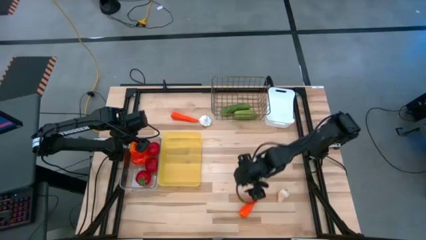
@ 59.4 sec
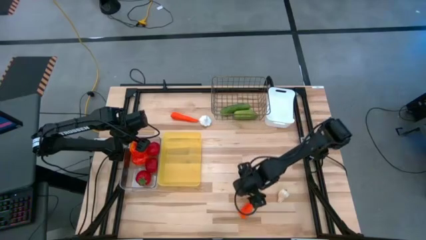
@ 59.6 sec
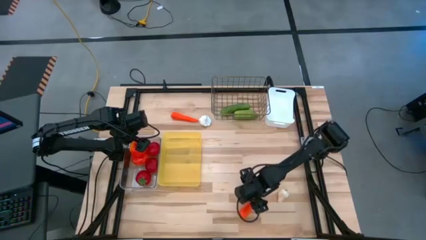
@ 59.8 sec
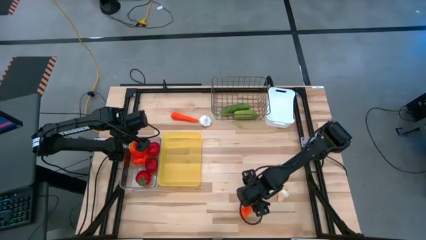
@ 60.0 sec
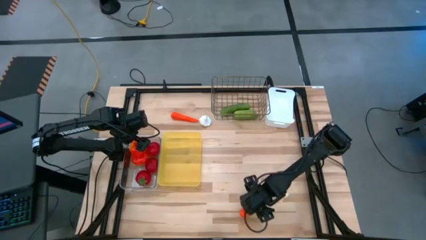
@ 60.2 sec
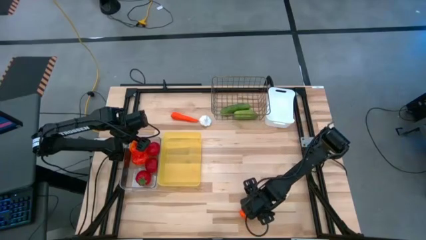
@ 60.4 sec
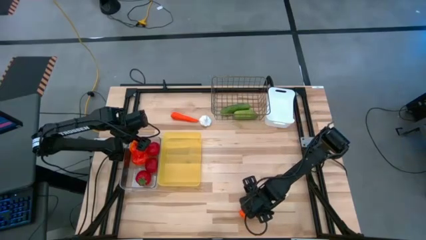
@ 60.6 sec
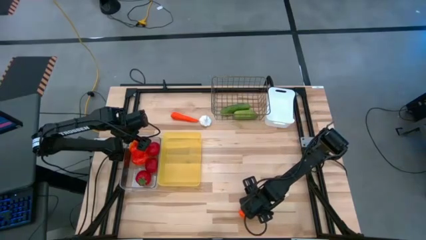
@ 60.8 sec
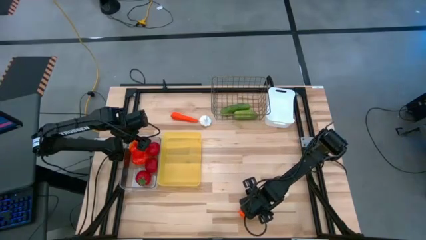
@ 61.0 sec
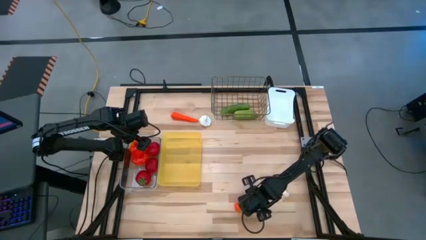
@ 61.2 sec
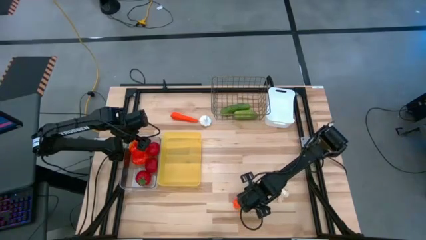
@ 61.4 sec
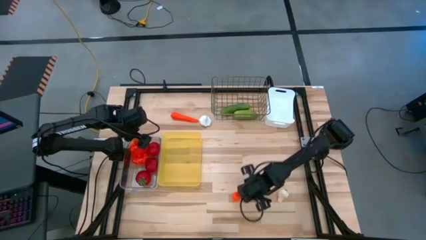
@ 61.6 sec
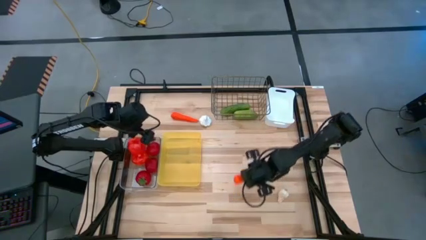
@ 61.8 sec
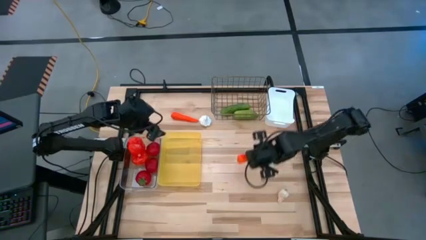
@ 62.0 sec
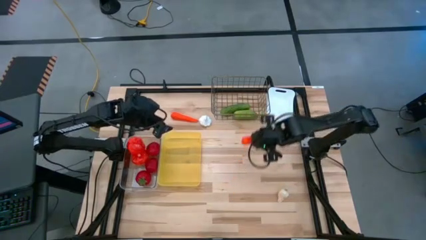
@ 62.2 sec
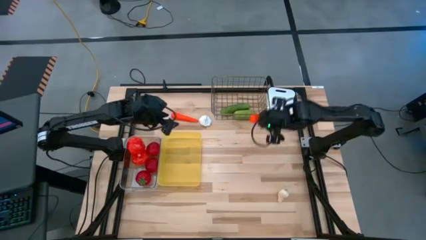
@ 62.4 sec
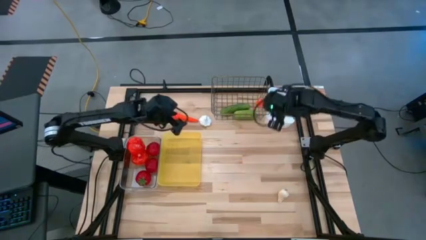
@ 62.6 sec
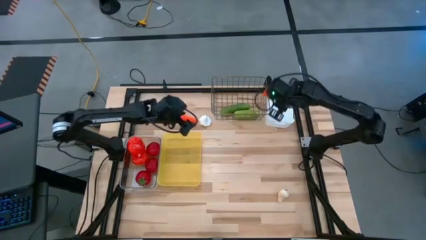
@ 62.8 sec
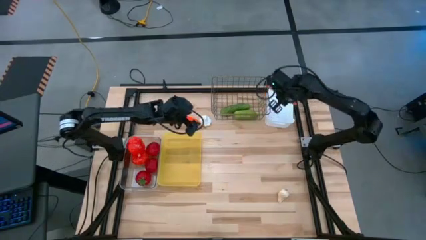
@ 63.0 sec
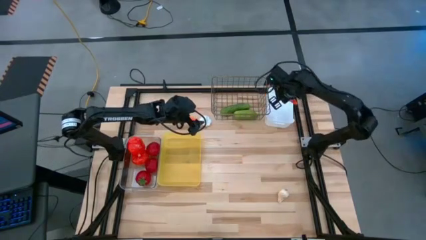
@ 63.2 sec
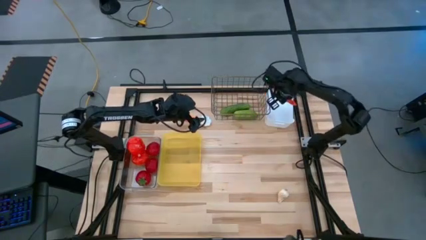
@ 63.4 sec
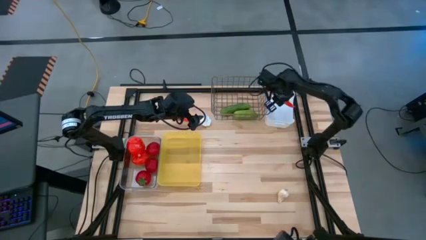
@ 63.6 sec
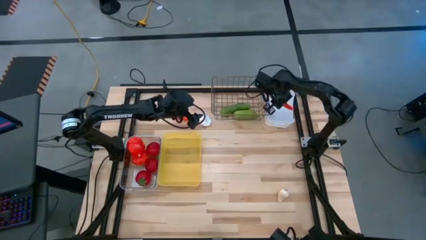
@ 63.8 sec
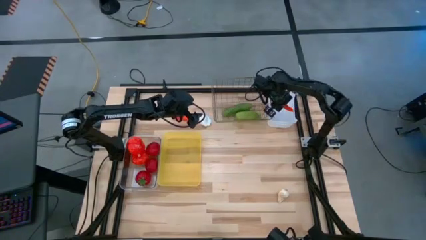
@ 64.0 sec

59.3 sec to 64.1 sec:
Task: Sort produce into baskets
Put the bottom carrot into the white bin

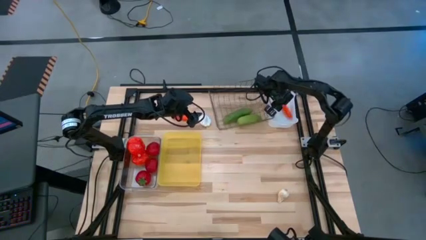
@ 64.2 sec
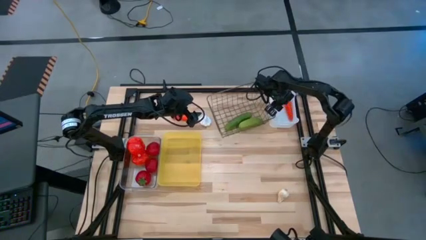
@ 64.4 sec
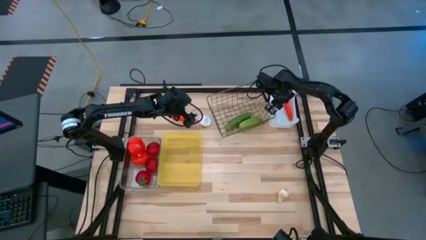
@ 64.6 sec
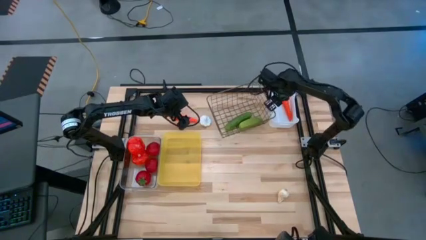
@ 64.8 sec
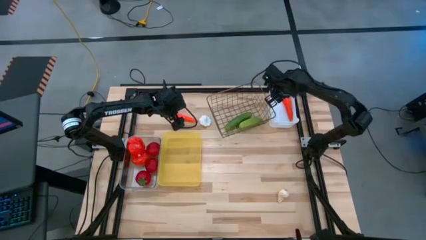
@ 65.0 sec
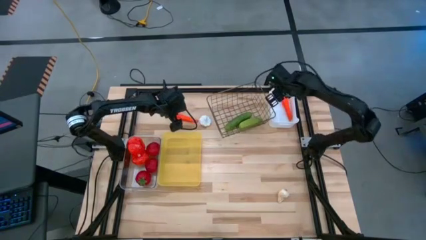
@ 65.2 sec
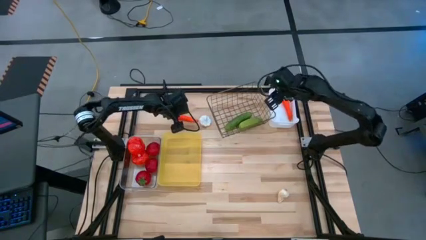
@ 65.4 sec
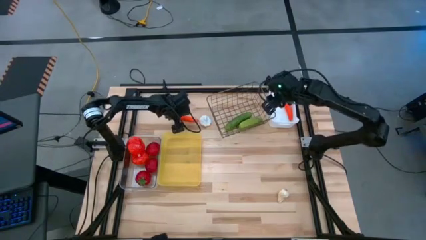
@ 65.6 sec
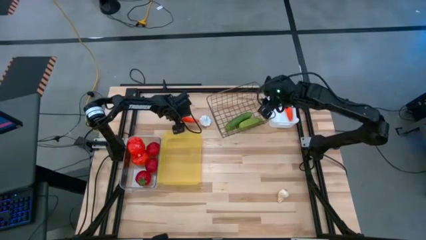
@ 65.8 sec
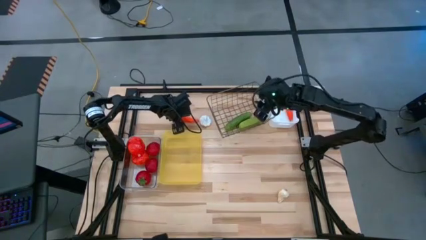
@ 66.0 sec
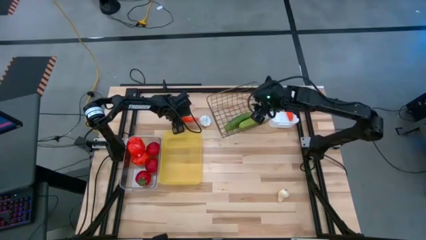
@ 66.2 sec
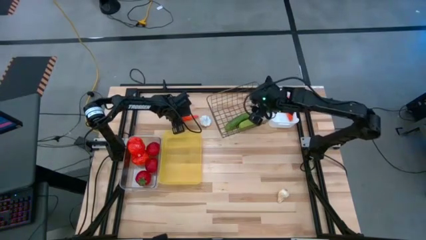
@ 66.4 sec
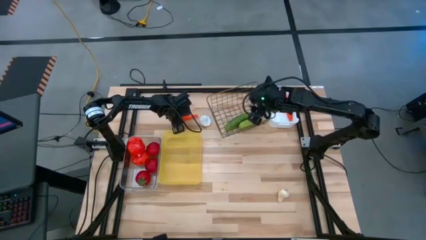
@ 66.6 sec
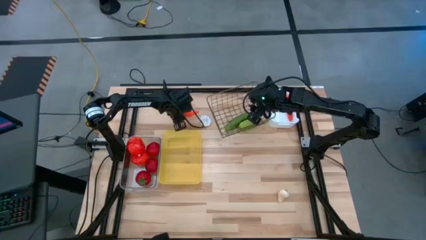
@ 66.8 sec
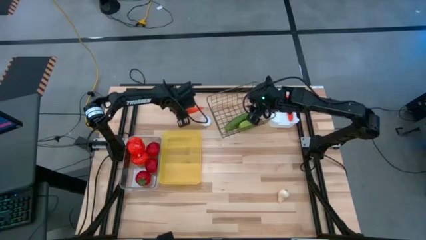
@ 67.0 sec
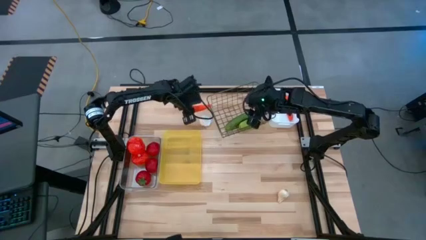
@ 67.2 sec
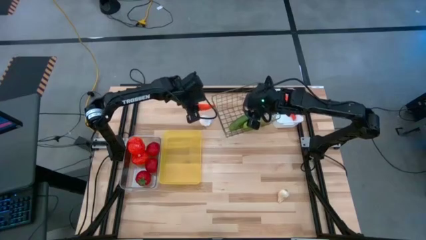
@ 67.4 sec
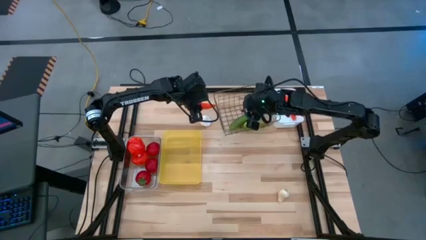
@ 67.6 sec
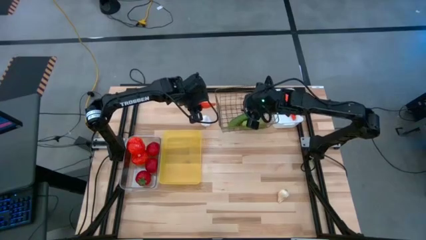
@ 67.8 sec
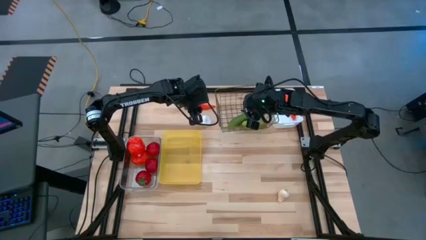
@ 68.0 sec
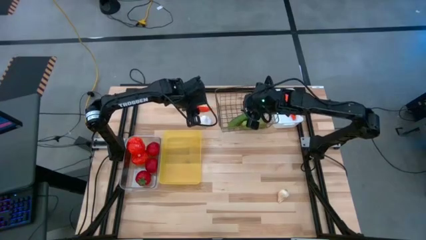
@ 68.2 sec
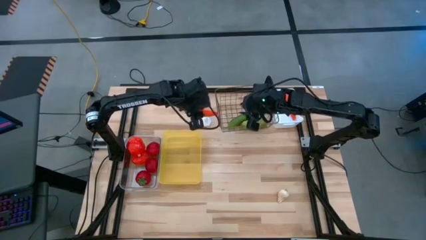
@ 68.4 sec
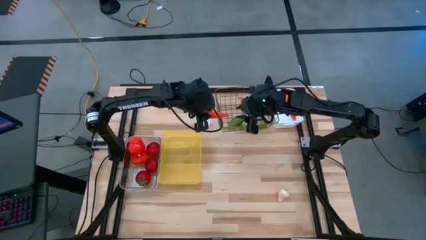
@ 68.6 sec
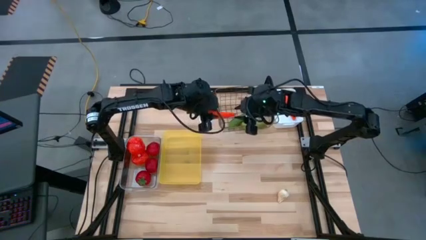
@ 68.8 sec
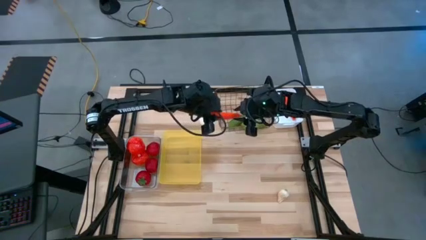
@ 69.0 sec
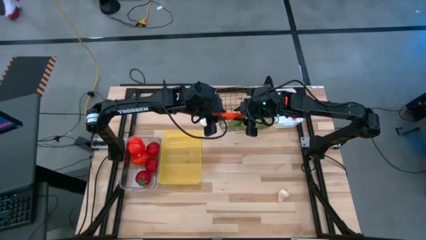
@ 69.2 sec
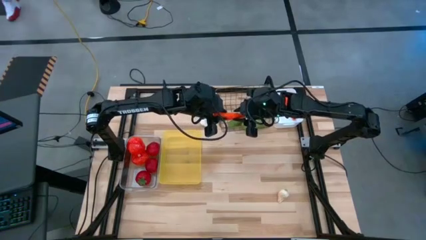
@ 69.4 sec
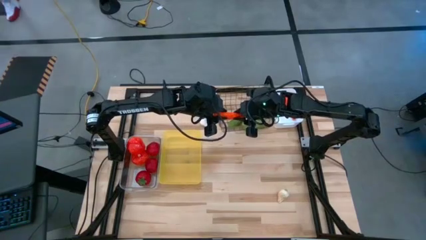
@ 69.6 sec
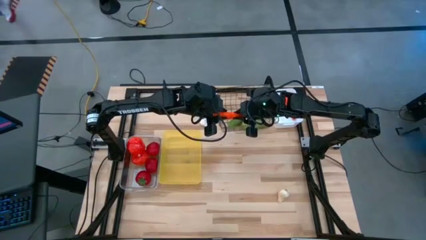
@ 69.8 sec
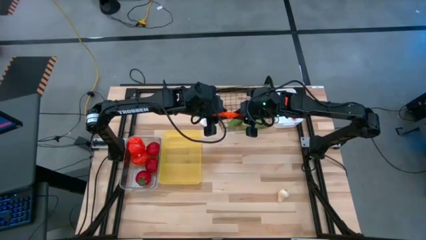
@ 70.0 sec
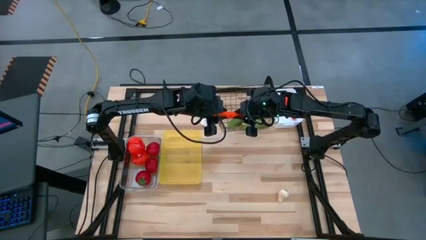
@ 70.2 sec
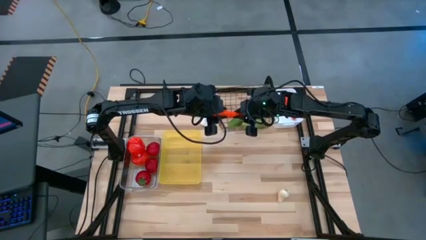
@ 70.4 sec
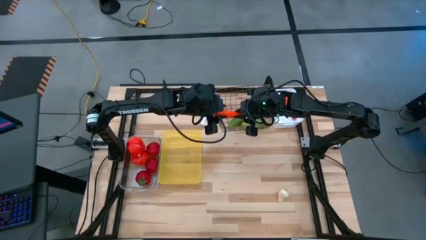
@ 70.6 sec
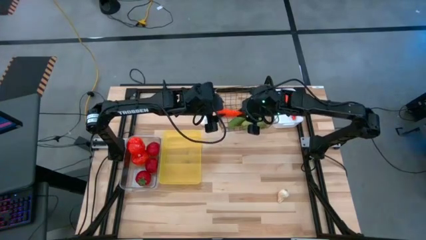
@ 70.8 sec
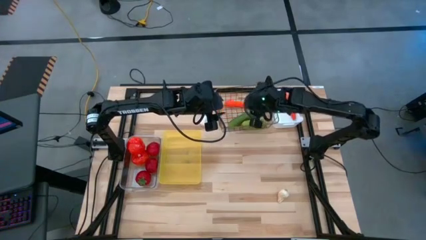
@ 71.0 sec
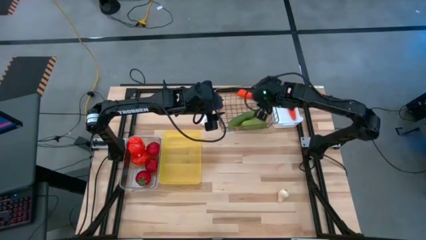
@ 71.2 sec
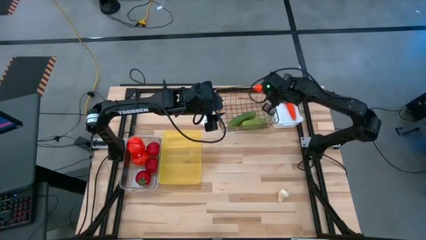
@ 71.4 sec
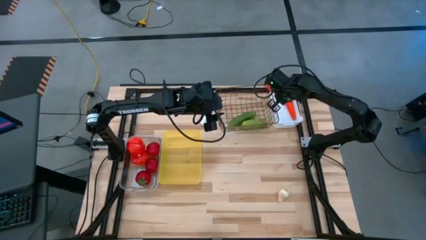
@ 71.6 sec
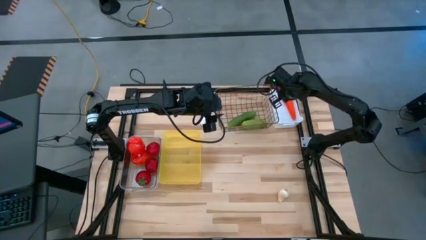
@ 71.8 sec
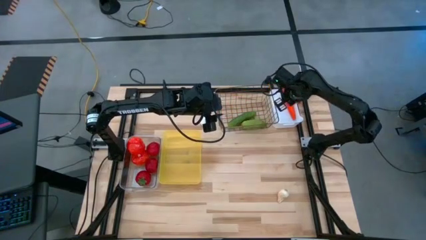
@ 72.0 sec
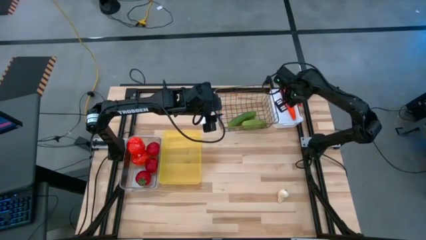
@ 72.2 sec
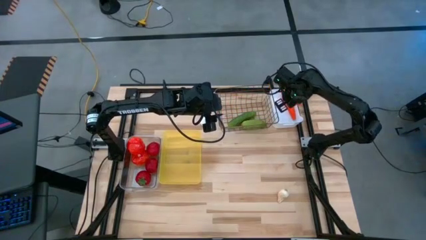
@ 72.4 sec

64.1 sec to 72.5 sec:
Put the carrot into the white bin

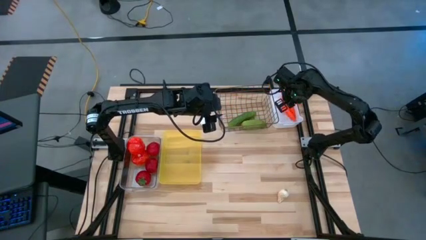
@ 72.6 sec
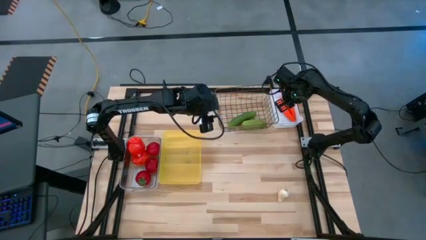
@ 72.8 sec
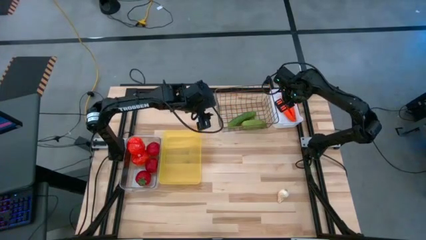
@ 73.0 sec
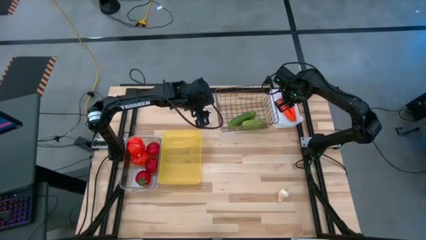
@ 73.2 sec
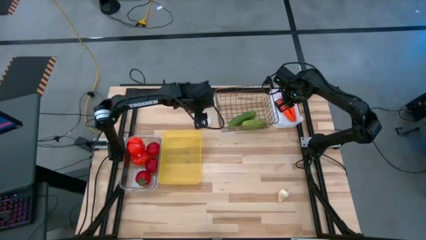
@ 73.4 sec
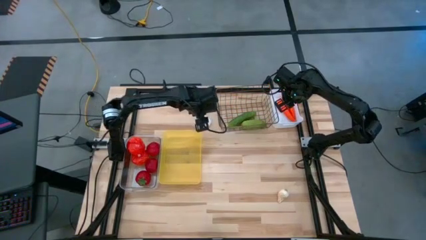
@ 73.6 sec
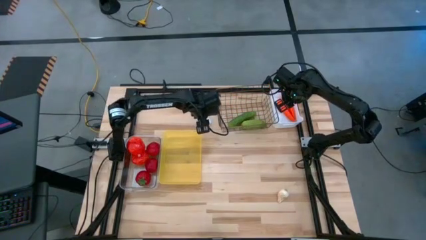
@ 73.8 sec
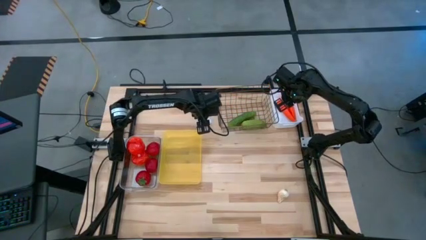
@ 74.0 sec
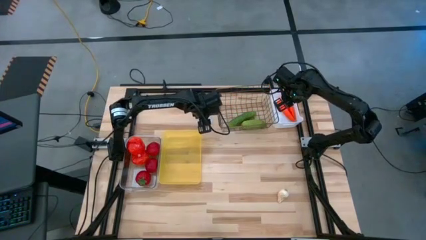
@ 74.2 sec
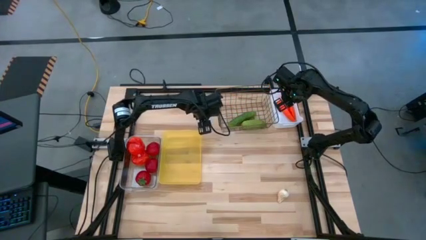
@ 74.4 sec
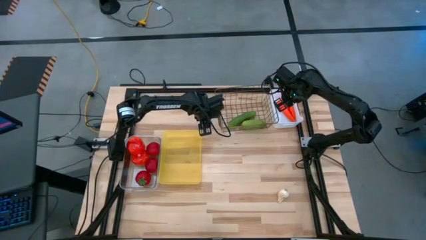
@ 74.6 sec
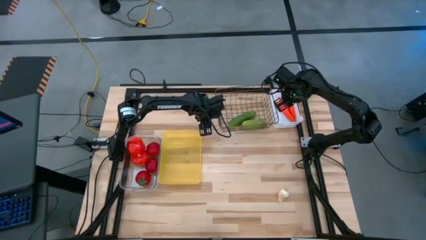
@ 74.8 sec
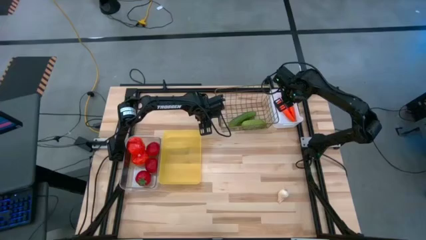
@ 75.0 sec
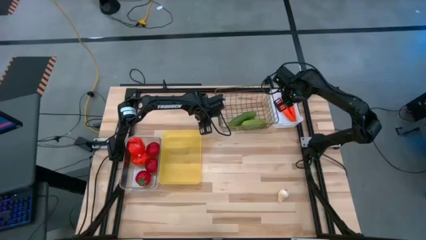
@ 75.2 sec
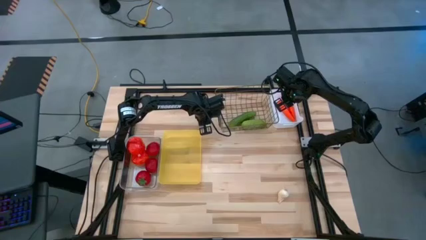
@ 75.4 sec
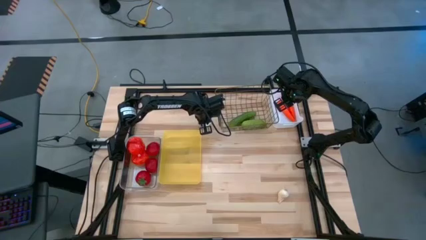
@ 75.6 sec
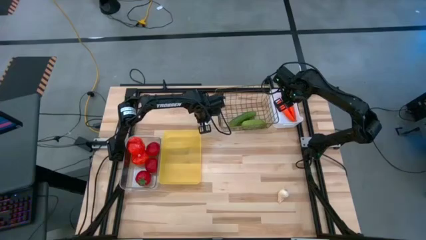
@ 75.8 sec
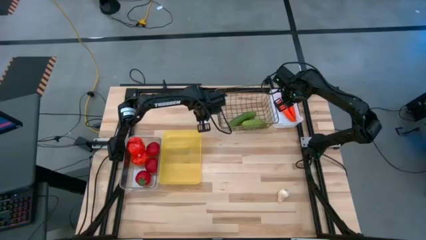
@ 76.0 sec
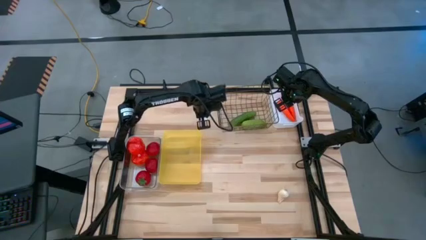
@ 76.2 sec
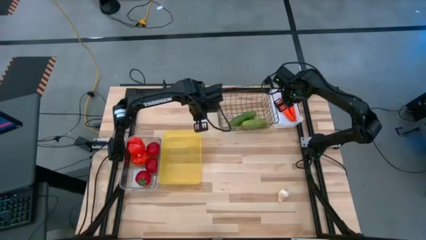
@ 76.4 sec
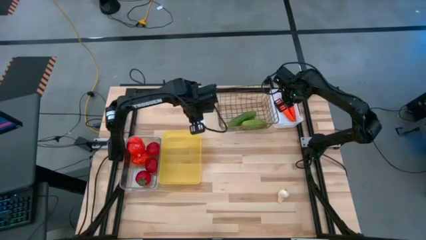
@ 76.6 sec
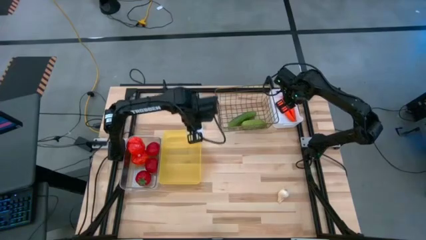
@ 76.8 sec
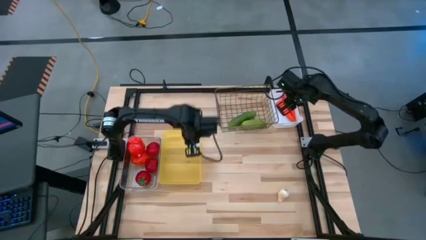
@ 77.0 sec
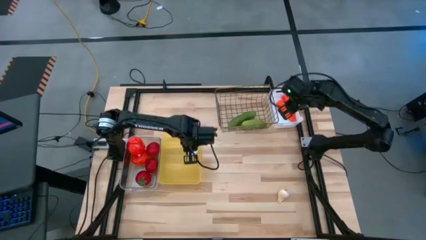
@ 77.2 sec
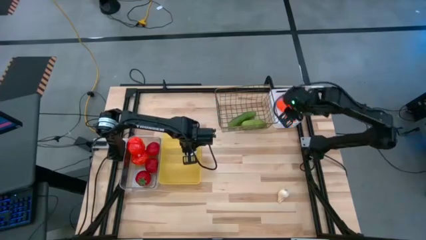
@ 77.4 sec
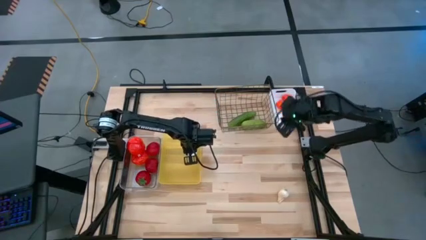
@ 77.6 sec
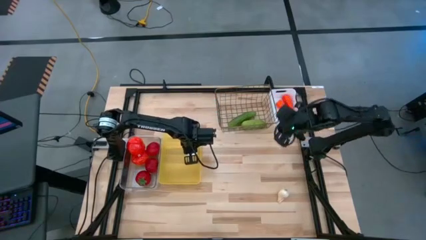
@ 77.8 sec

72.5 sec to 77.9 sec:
Put the top white garlic into the yellow bin
